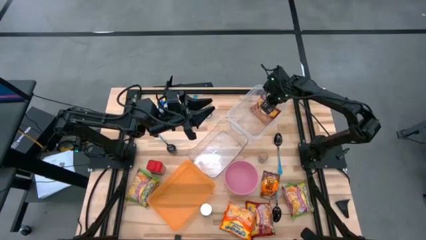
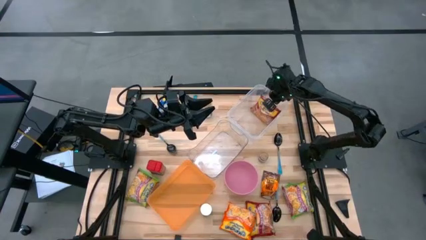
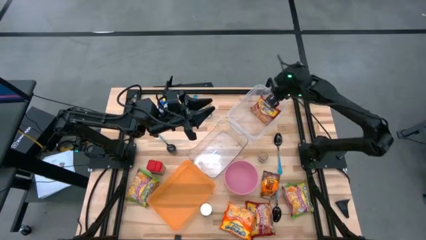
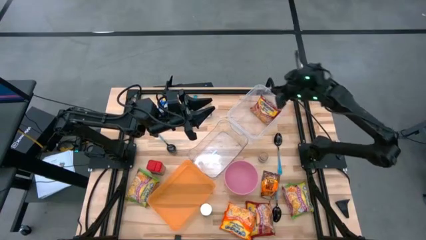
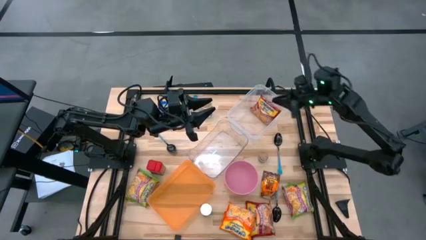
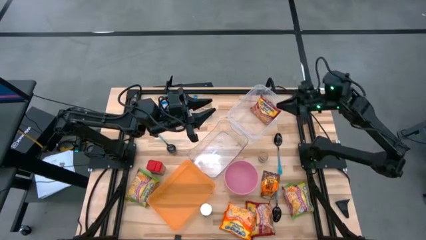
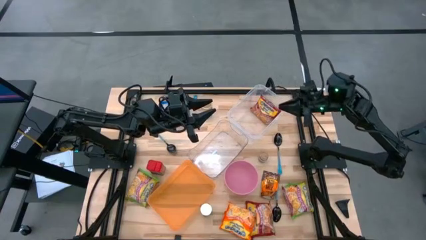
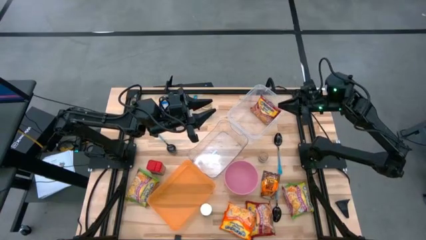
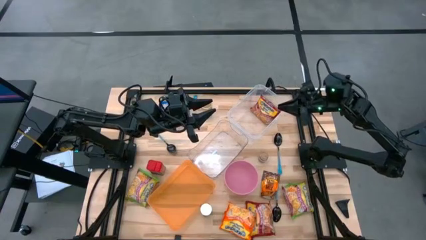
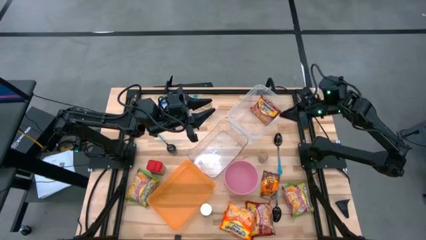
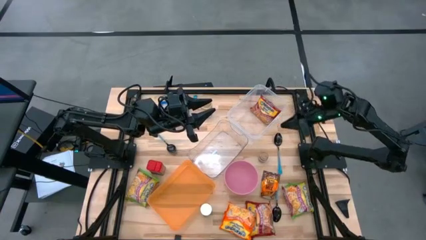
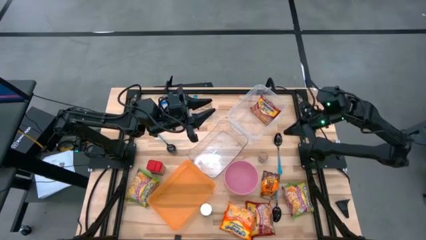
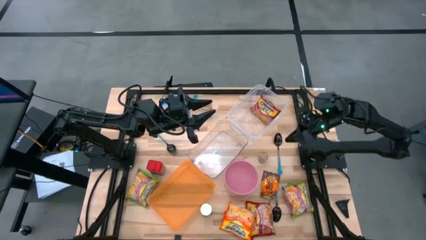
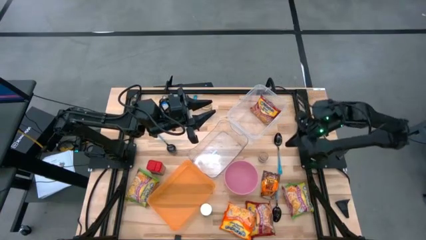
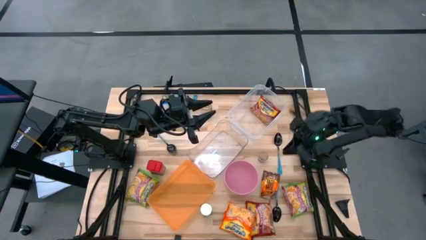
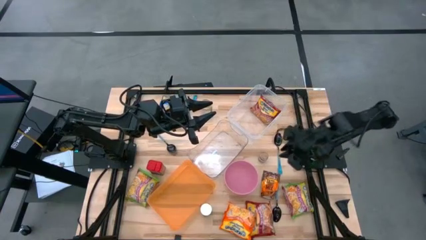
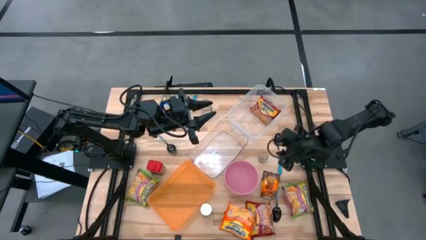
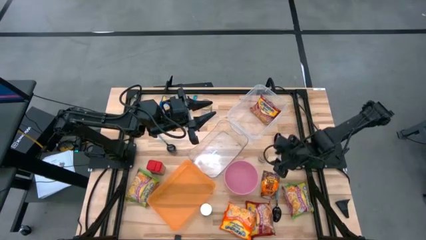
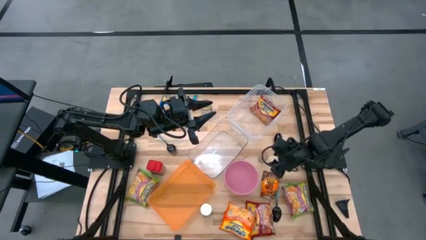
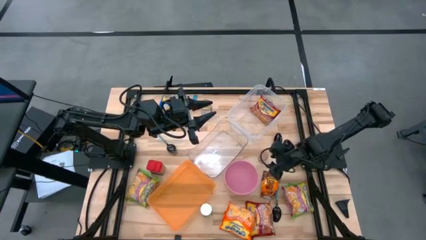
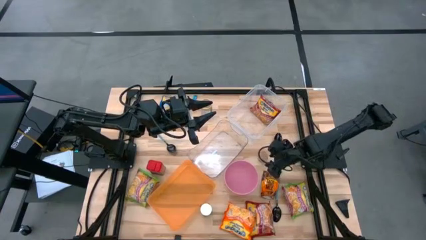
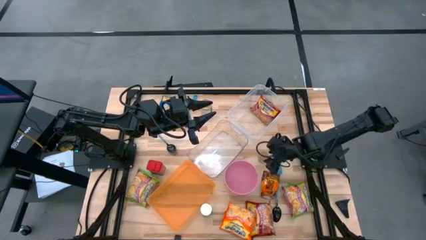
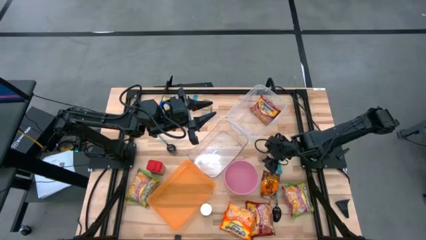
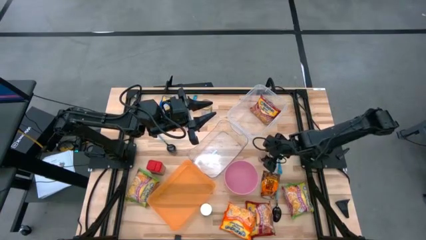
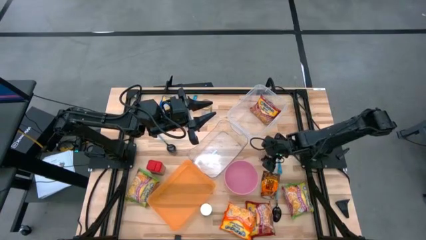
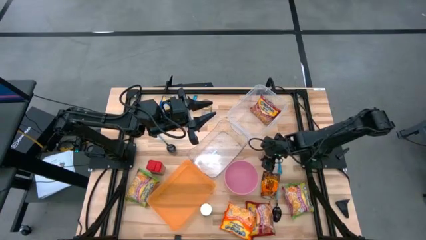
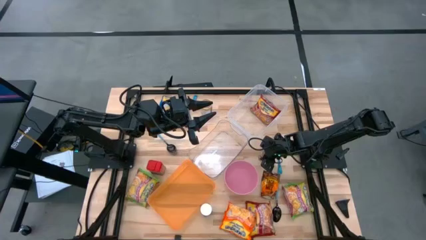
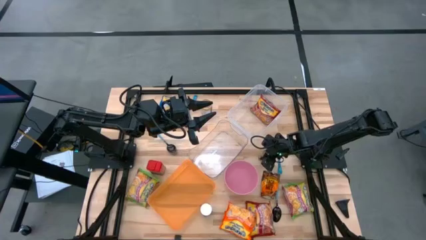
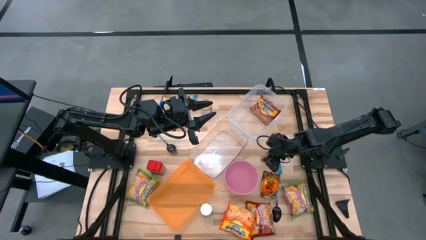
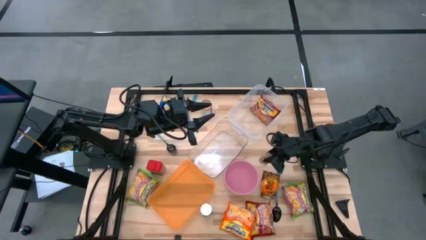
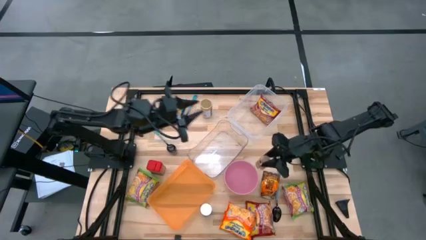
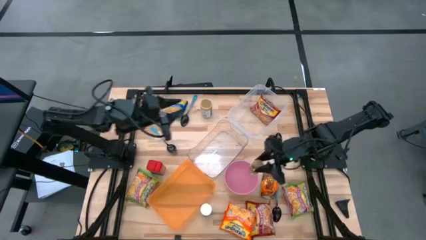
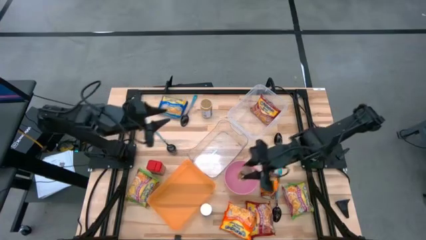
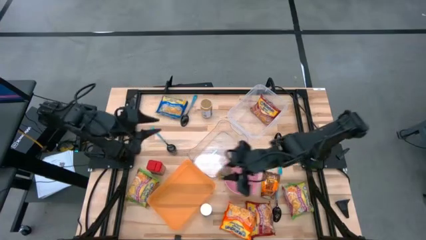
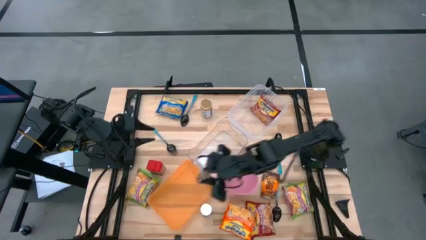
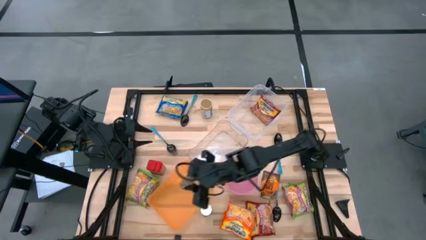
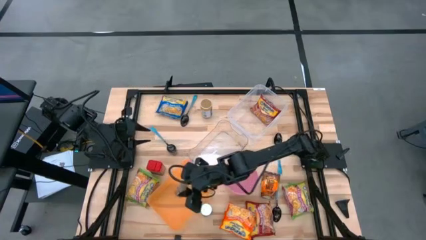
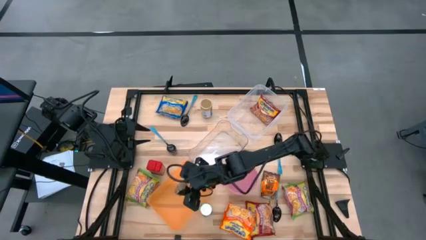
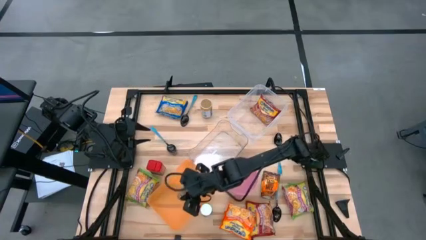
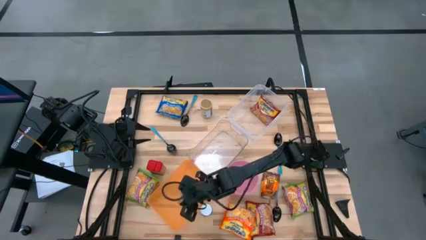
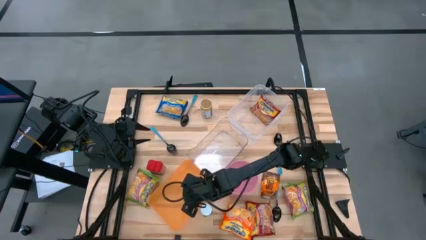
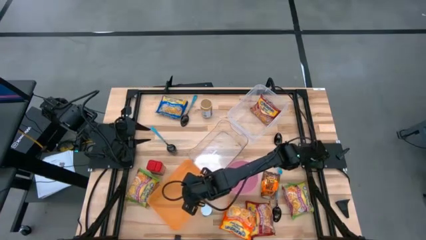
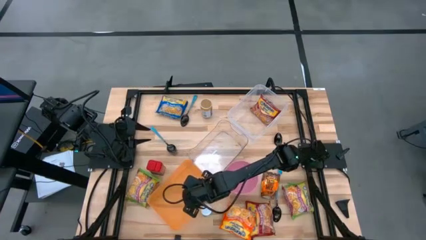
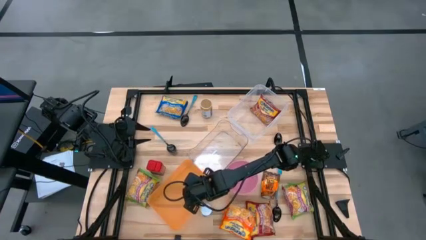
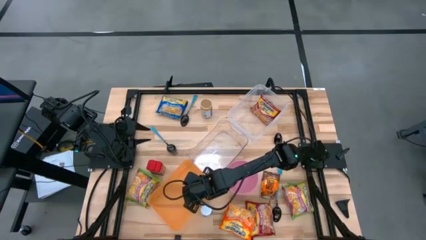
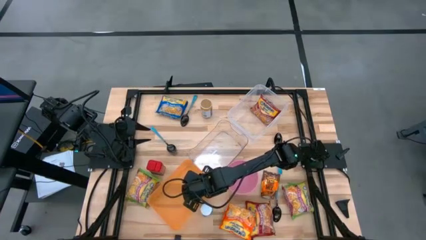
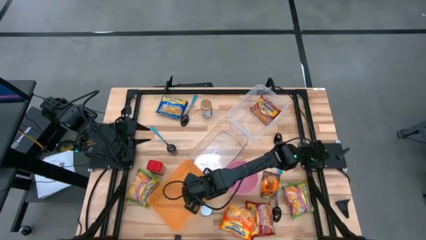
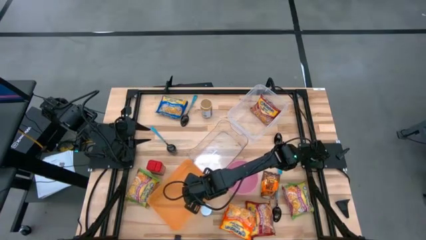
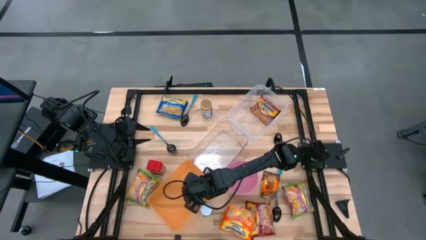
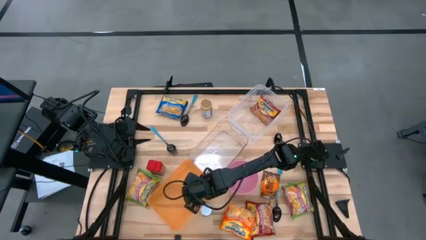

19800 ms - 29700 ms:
Task: Pick & Place Food Item
Put the brown seasoning bottle into the orange bin
